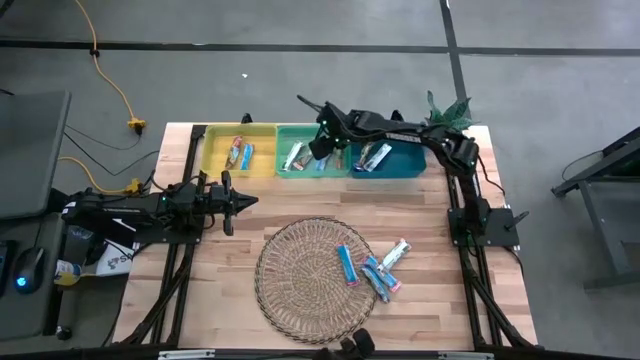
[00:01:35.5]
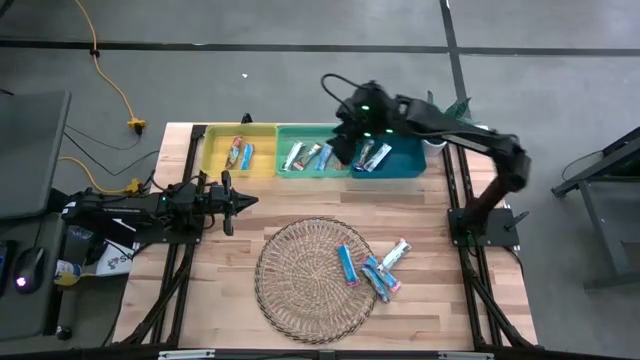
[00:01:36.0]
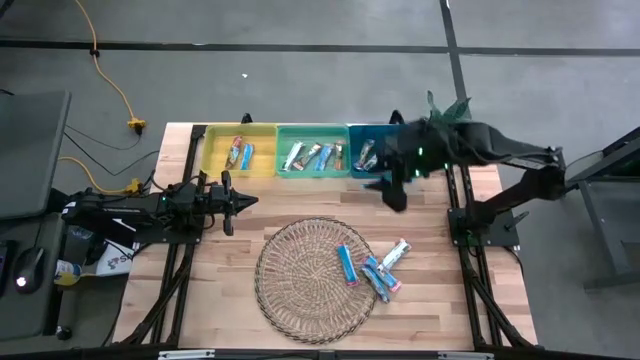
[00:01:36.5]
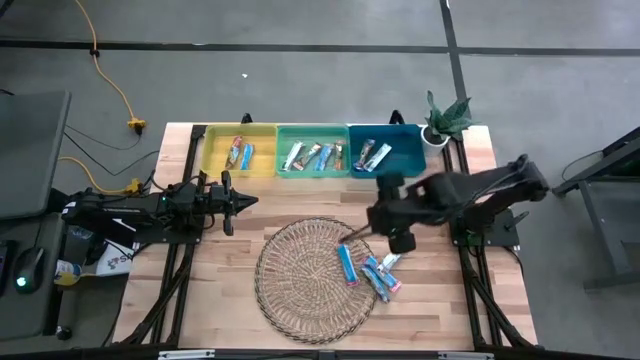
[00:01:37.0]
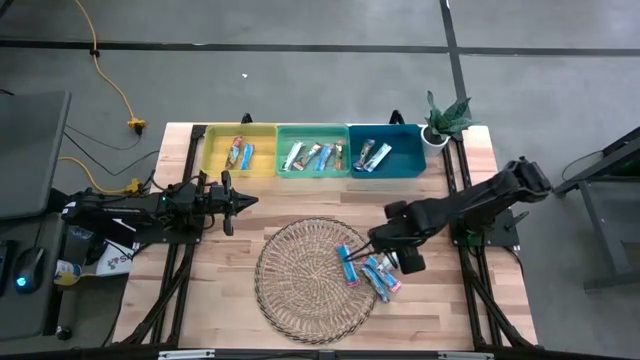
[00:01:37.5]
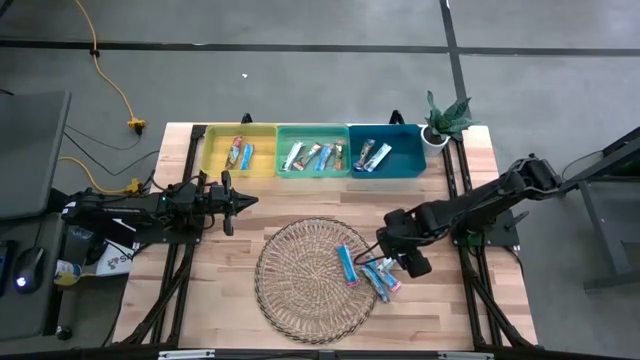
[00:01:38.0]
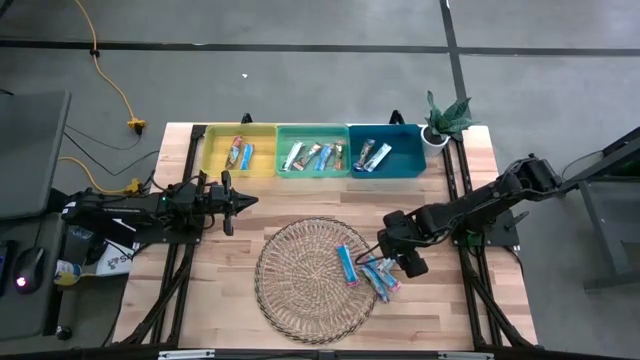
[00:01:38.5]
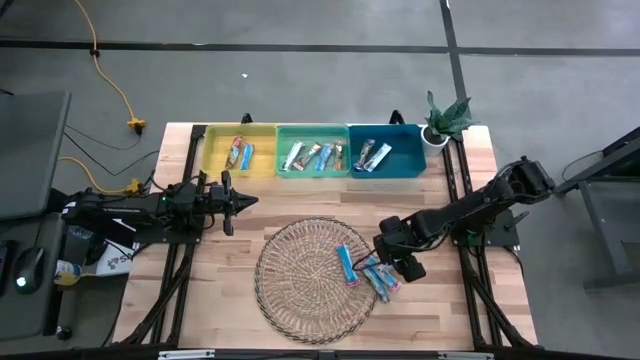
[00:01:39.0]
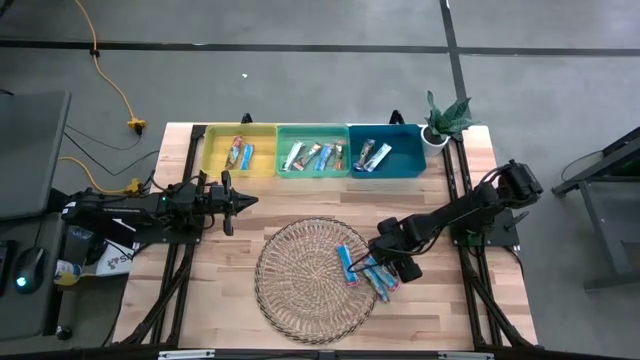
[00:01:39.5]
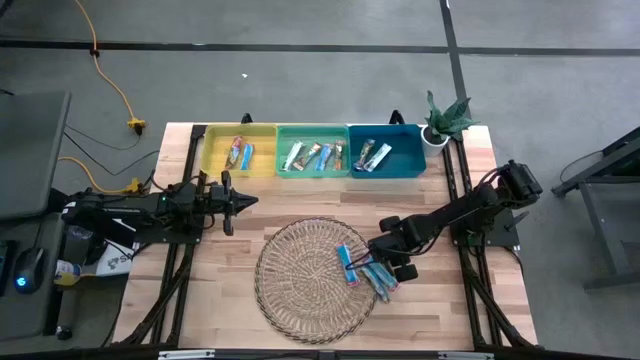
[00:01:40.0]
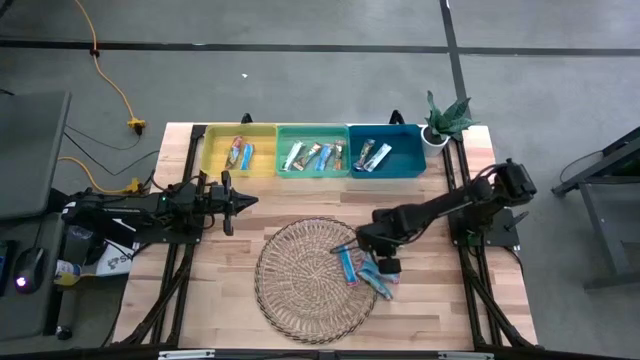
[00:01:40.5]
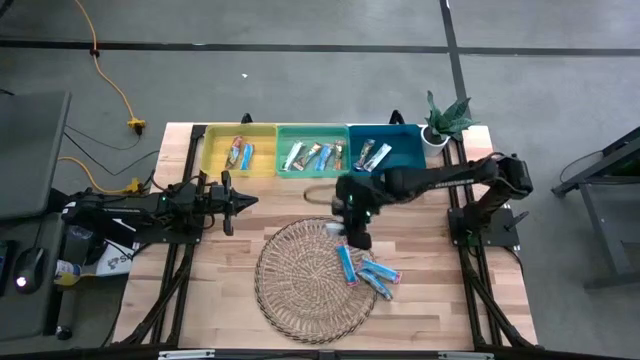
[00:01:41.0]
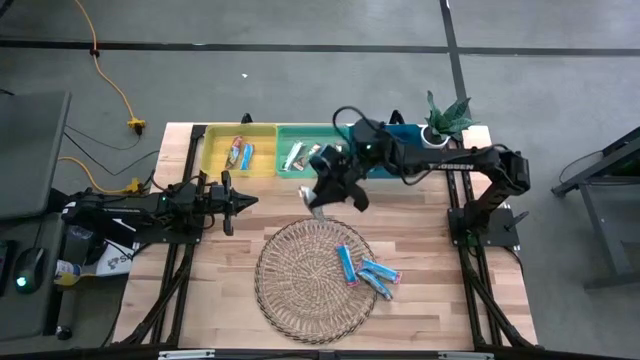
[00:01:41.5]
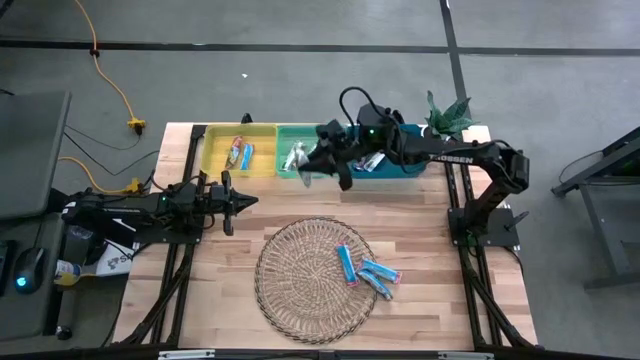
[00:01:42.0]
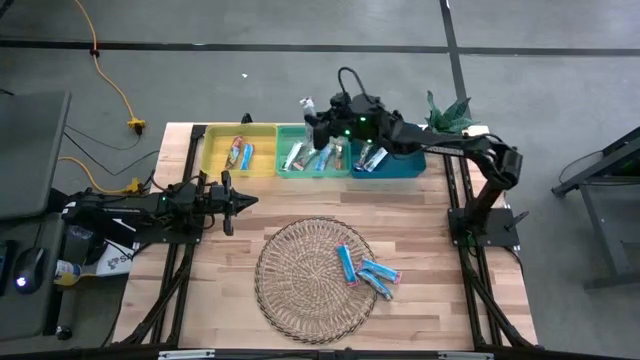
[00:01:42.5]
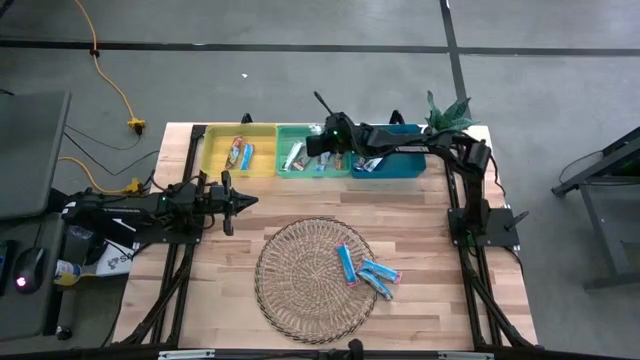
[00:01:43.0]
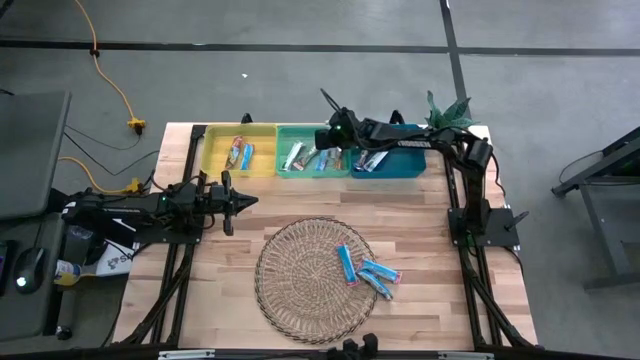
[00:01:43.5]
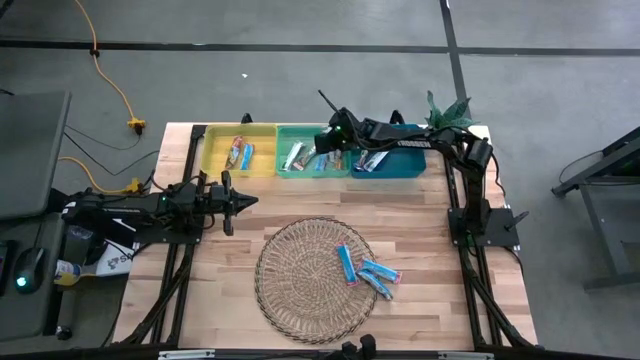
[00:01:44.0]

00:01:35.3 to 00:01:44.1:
Task: Pick and place Granola Bars by type
Put the yellow granola bar into the green bin

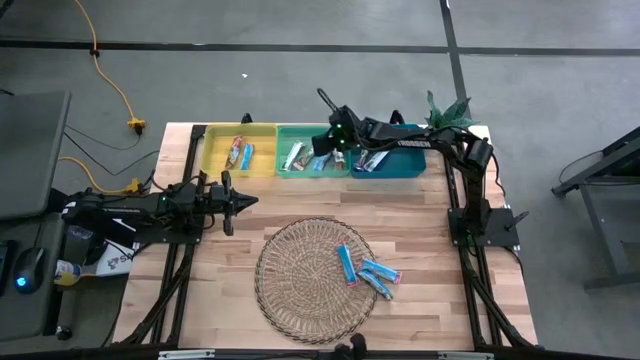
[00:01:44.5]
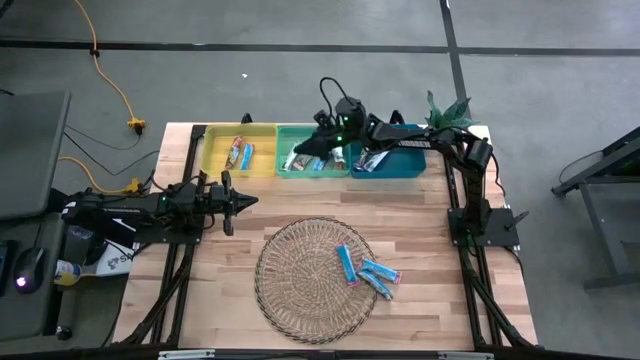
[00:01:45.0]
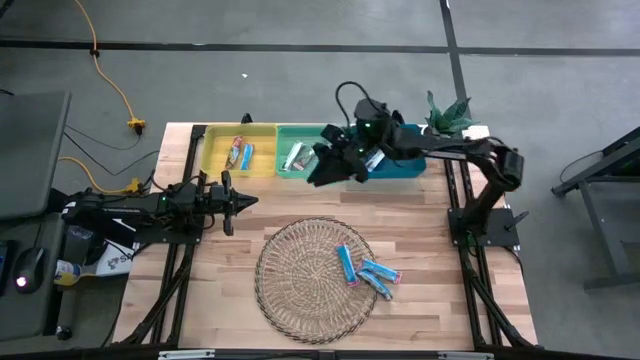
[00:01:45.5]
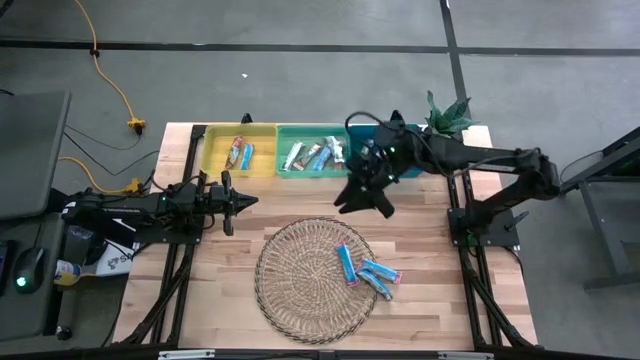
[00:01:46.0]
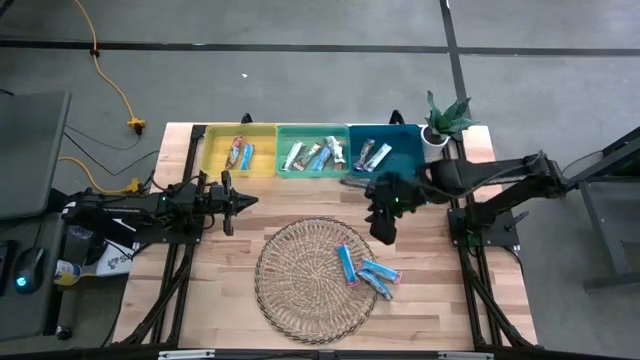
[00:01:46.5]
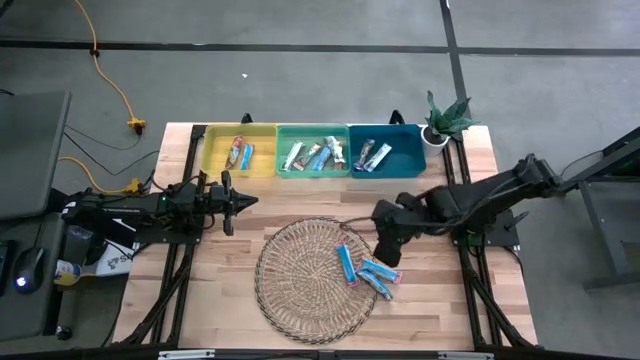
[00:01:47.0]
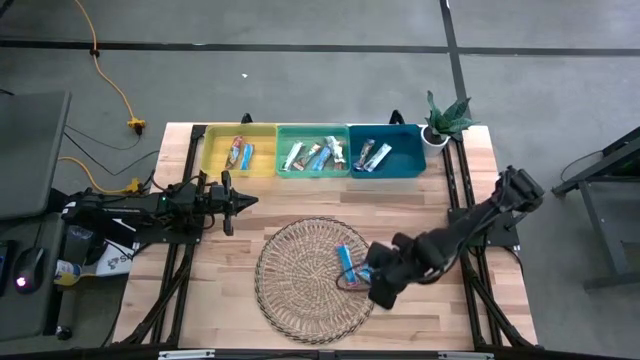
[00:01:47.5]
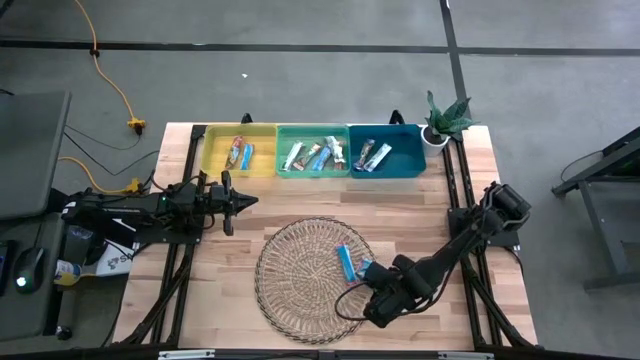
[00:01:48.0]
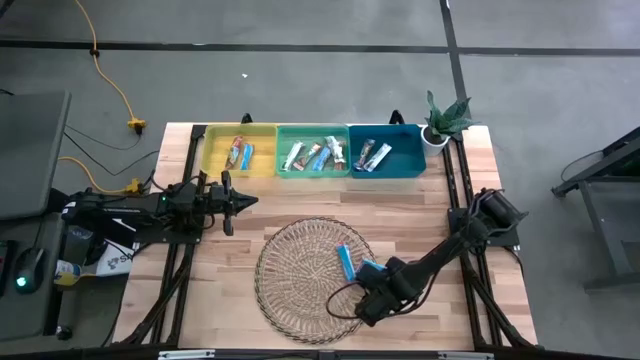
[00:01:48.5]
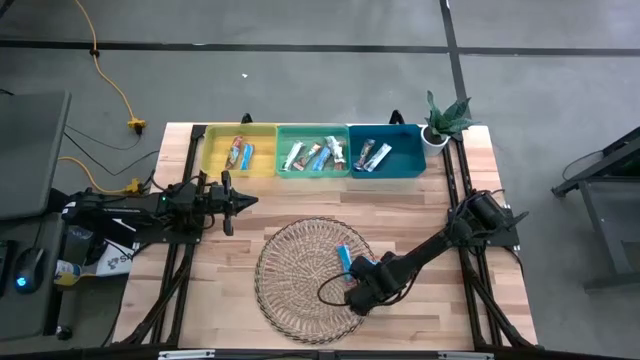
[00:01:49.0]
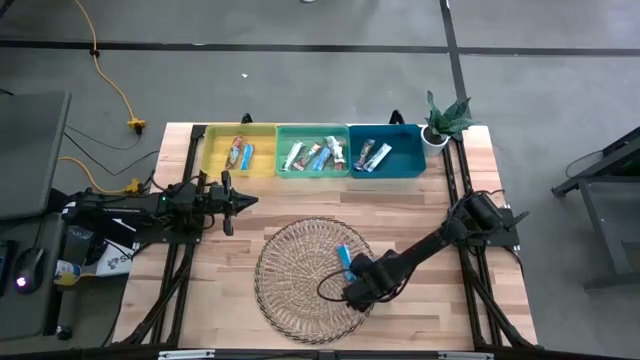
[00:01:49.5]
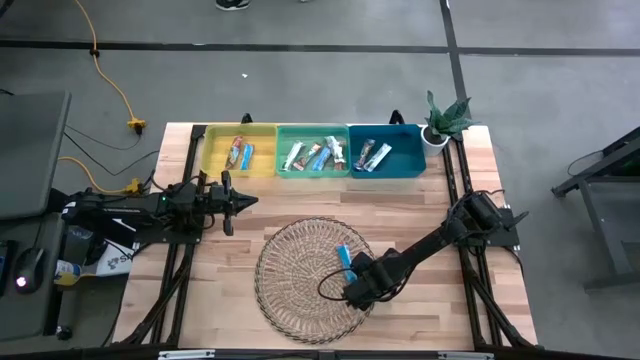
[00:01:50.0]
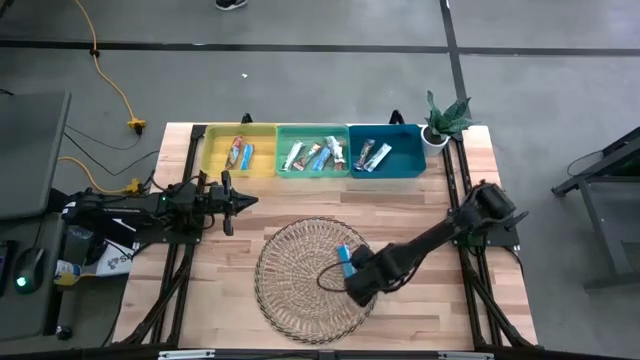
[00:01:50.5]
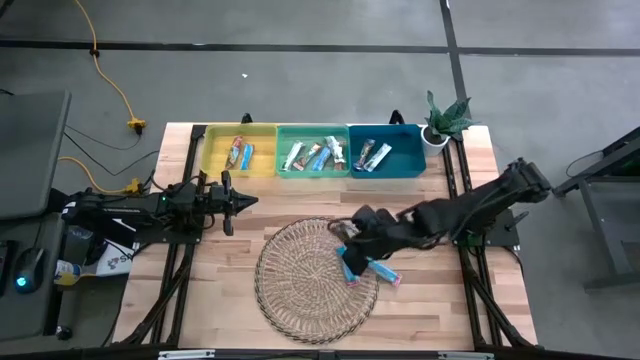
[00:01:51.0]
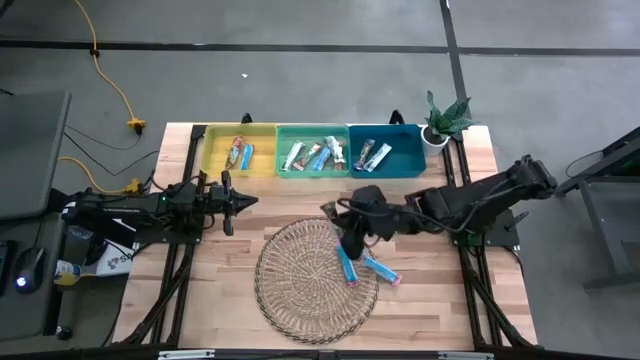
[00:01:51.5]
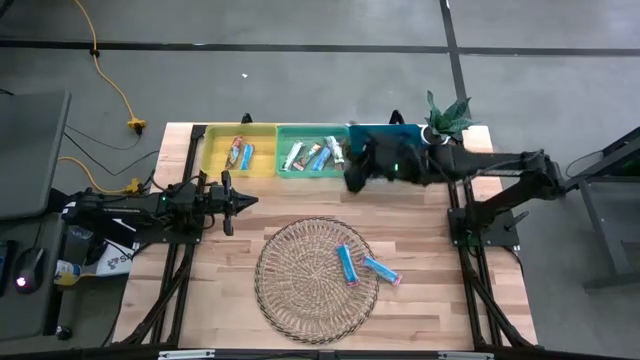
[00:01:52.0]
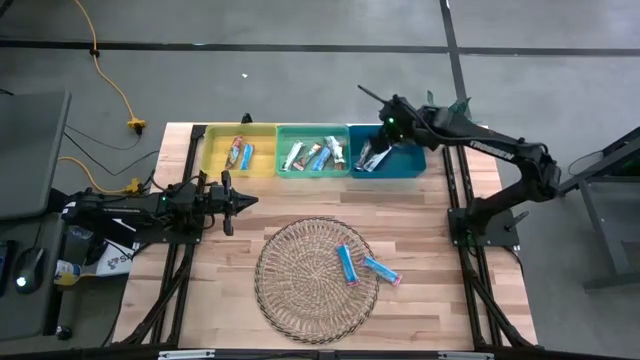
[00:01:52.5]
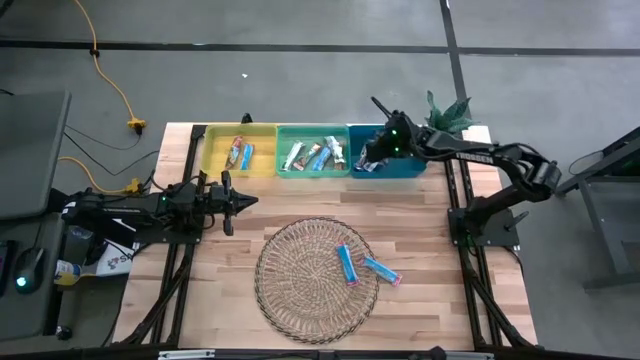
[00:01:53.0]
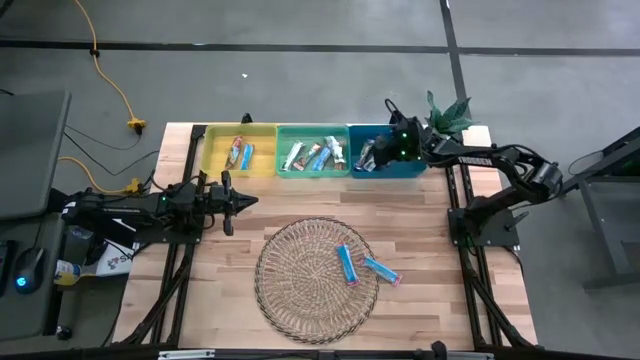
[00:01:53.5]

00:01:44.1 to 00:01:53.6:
Put the blue granola bar into the blue bin

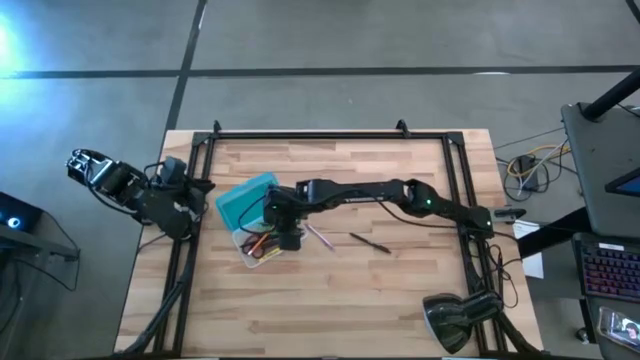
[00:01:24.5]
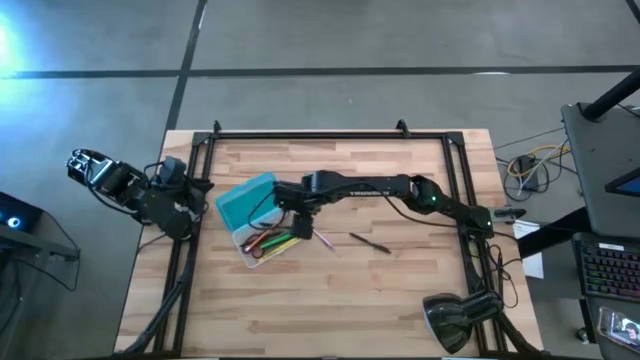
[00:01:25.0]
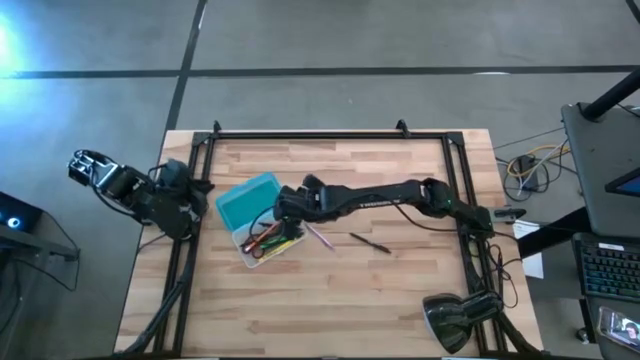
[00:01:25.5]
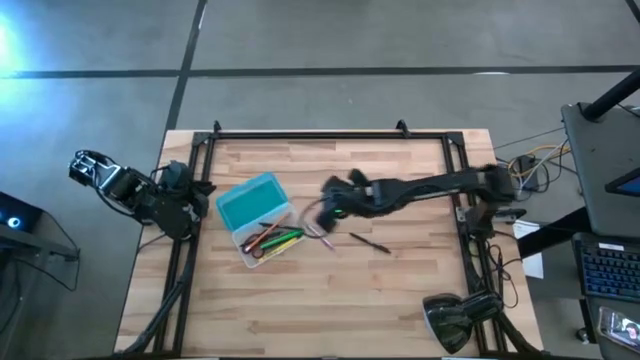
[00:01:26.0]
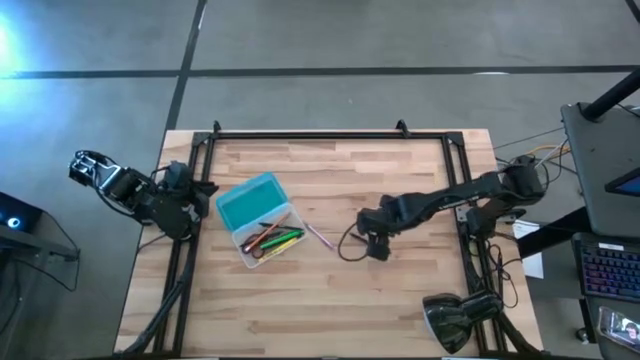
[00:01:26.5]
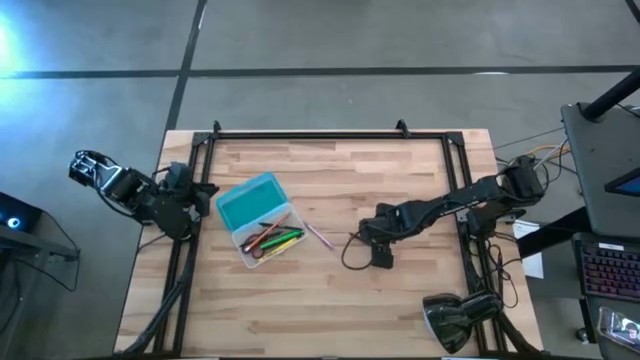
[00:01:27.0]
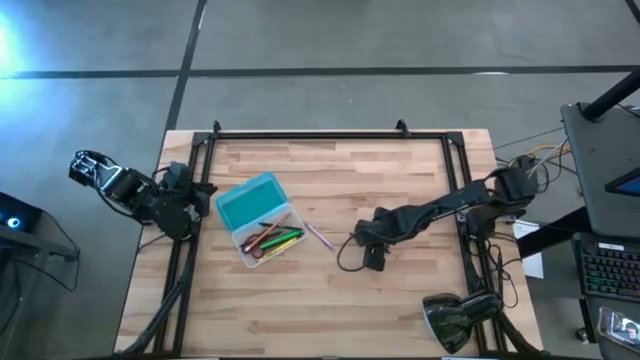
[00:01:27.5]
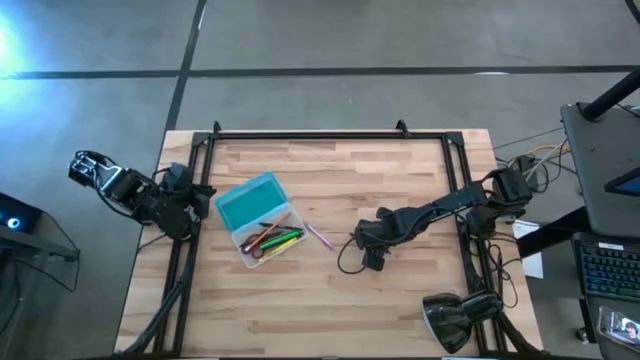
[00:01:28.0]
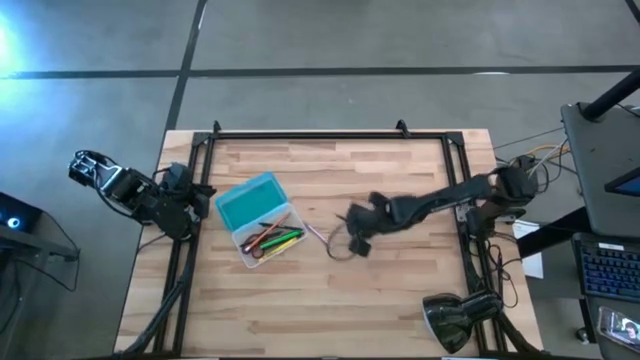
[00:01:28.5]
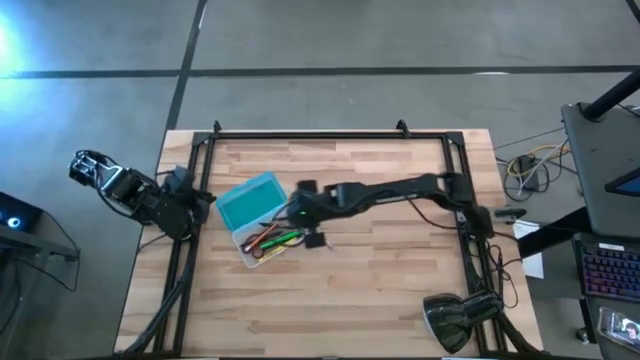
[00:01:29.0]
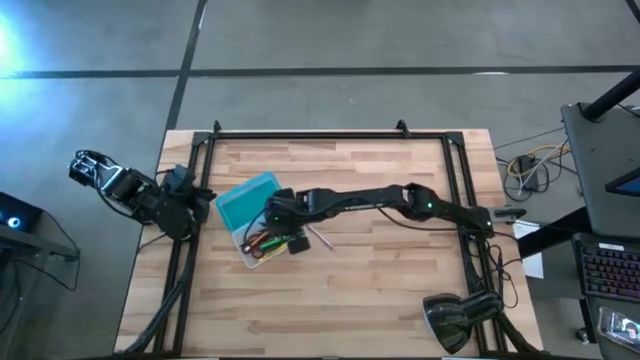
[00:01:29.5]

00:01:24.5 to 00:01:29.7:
Task: Pick & place school supplies into a supply box
Put the black pen into the blue supply box
